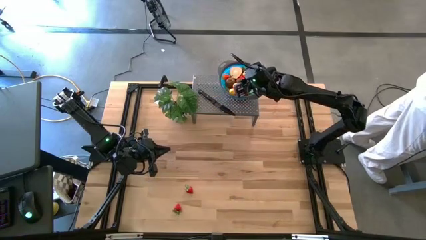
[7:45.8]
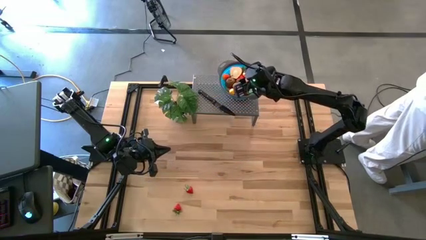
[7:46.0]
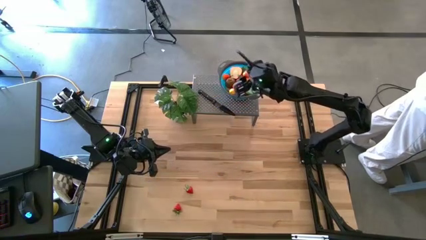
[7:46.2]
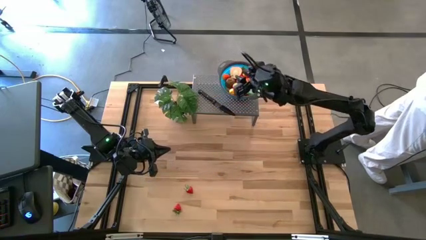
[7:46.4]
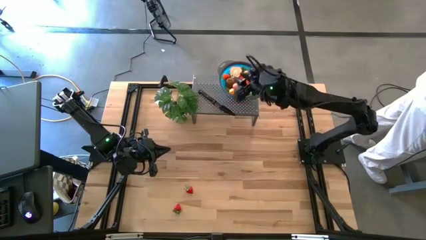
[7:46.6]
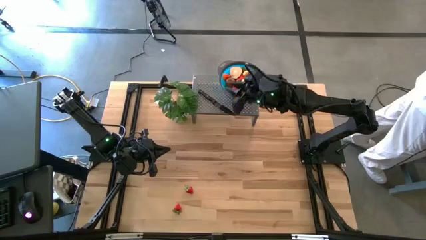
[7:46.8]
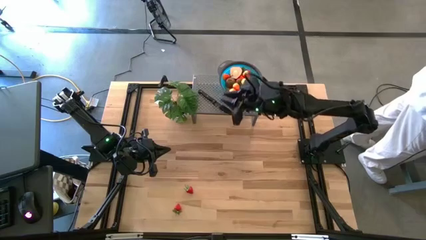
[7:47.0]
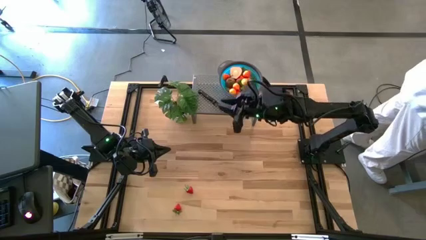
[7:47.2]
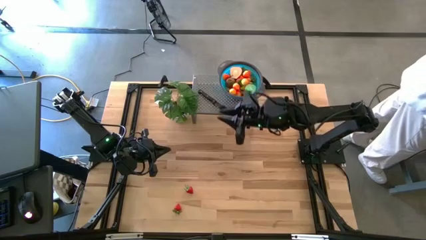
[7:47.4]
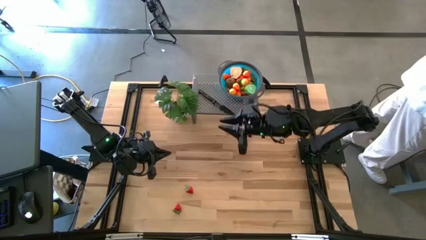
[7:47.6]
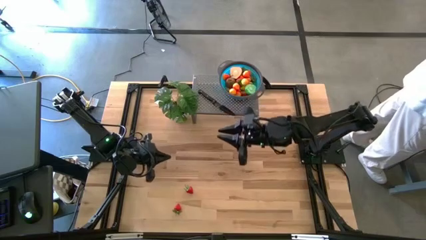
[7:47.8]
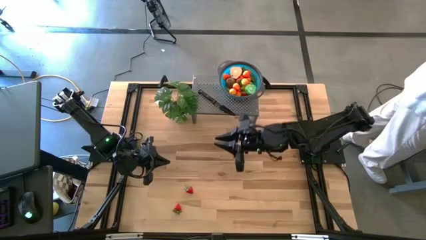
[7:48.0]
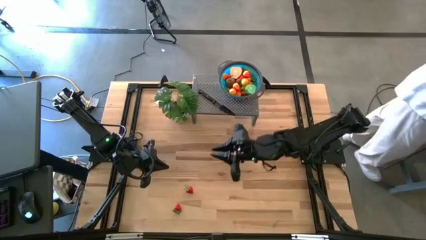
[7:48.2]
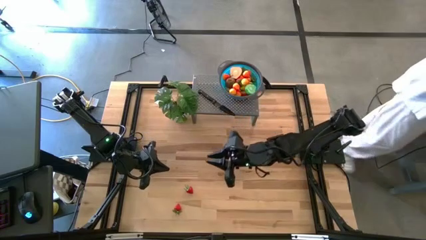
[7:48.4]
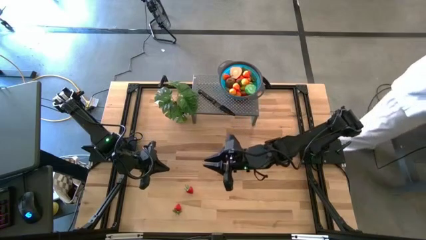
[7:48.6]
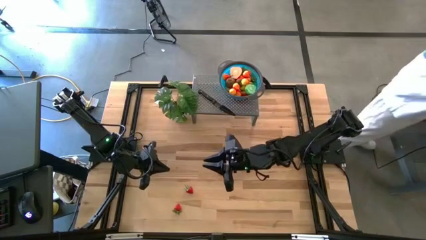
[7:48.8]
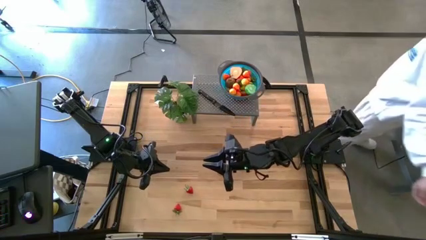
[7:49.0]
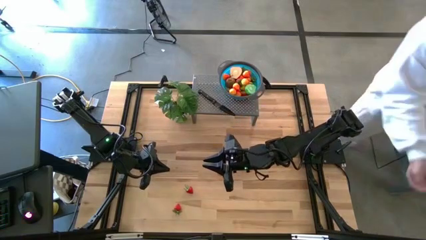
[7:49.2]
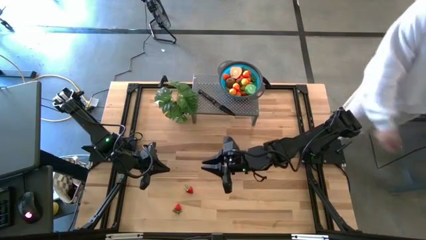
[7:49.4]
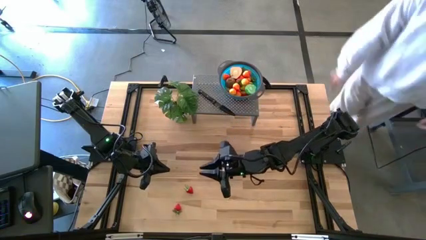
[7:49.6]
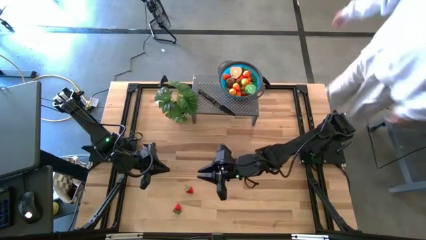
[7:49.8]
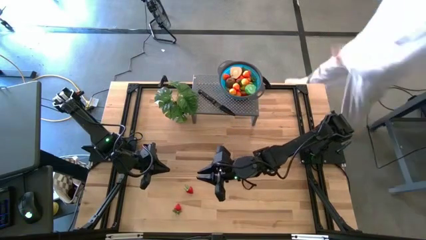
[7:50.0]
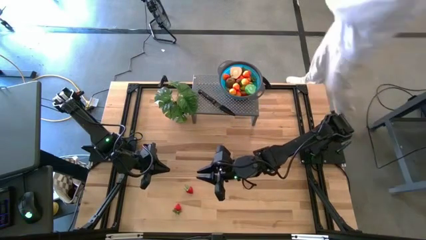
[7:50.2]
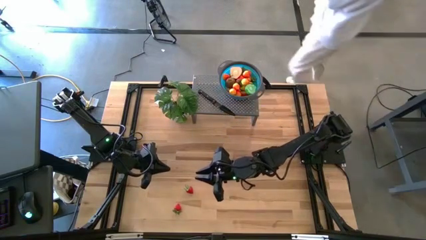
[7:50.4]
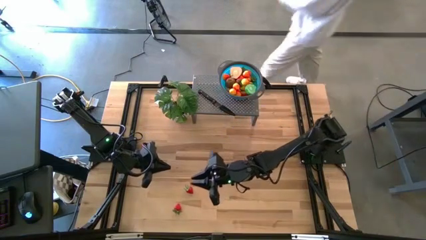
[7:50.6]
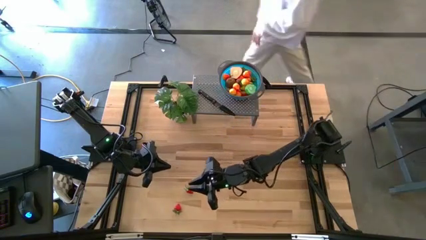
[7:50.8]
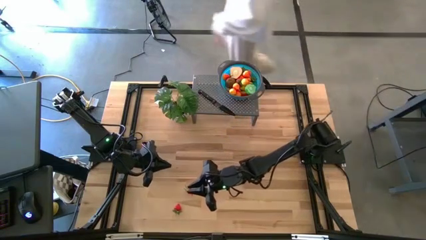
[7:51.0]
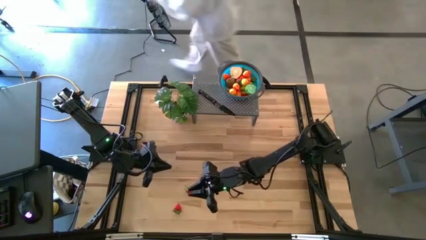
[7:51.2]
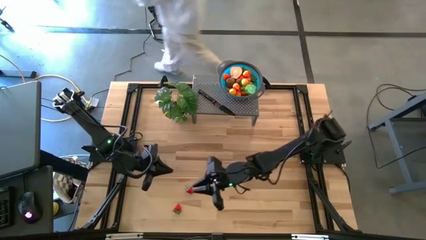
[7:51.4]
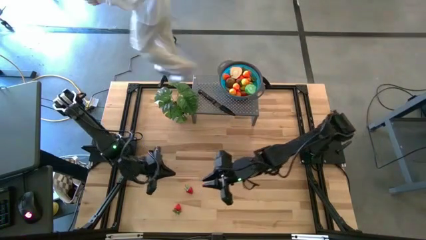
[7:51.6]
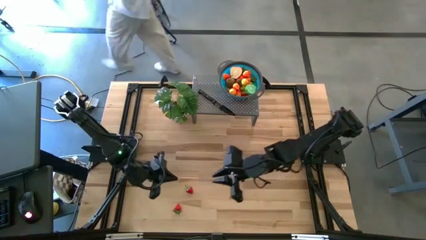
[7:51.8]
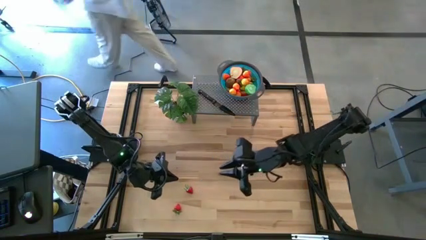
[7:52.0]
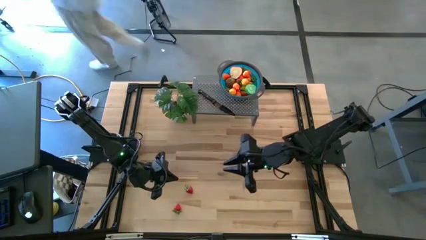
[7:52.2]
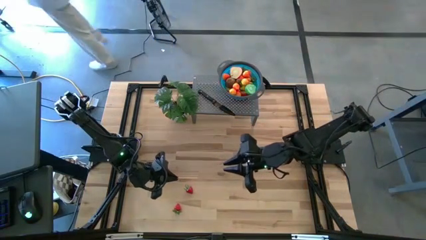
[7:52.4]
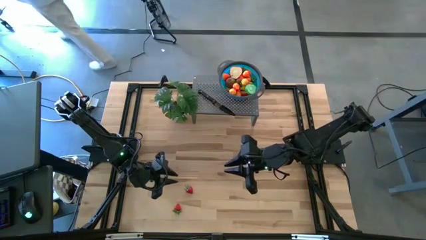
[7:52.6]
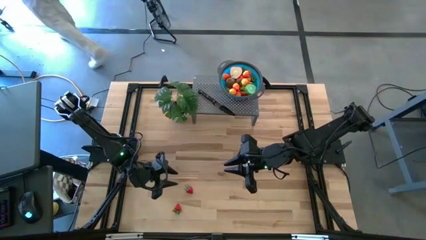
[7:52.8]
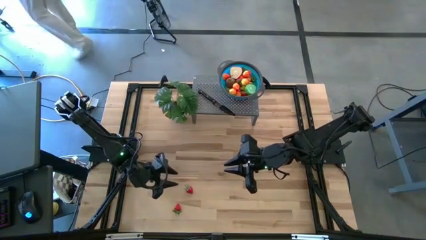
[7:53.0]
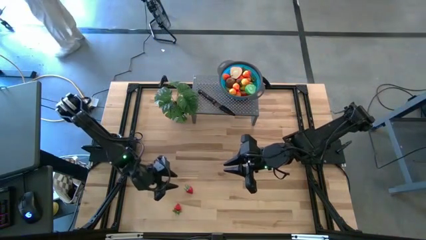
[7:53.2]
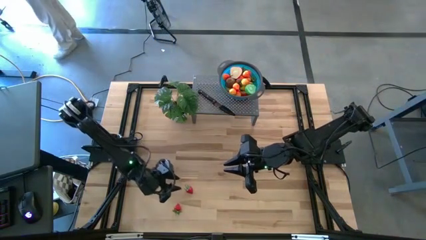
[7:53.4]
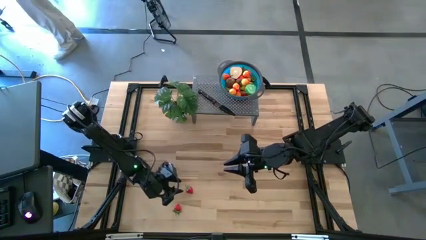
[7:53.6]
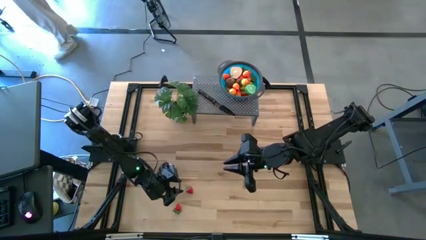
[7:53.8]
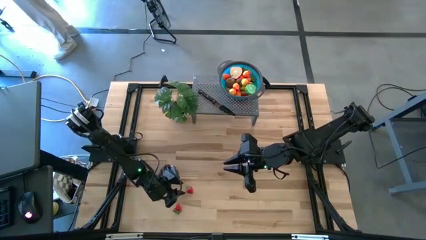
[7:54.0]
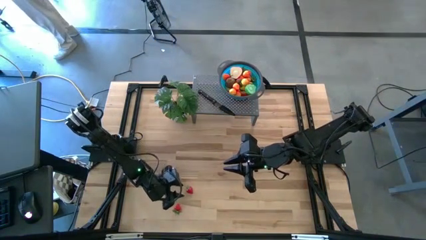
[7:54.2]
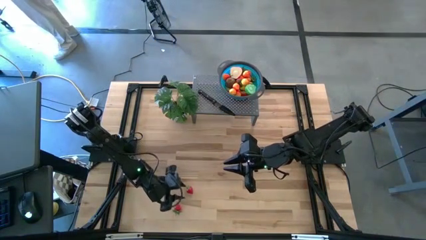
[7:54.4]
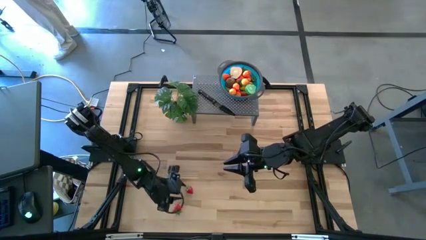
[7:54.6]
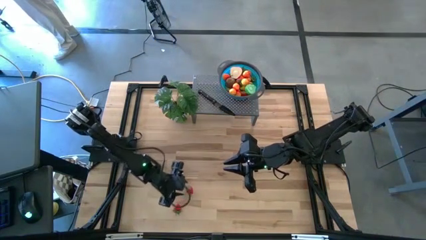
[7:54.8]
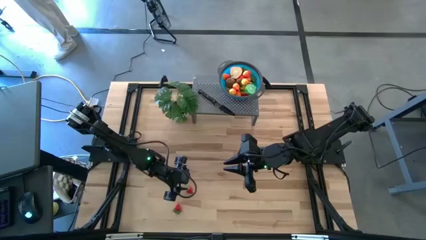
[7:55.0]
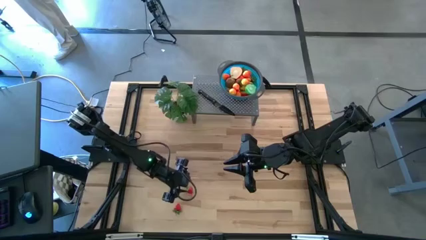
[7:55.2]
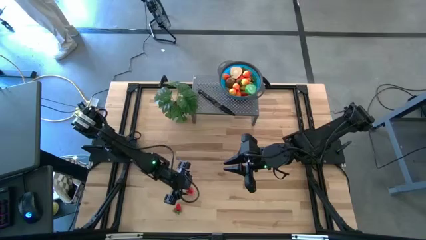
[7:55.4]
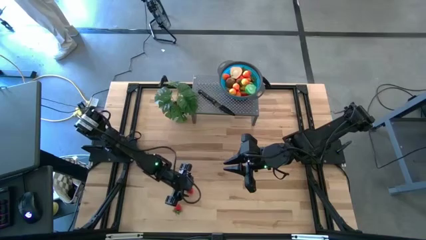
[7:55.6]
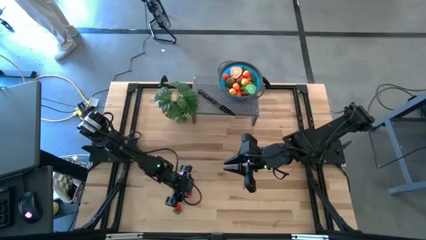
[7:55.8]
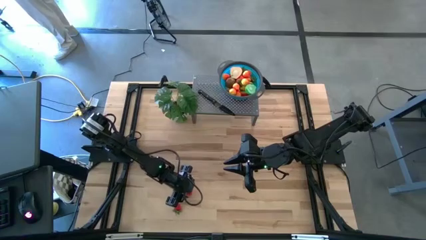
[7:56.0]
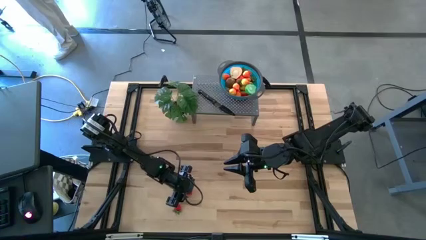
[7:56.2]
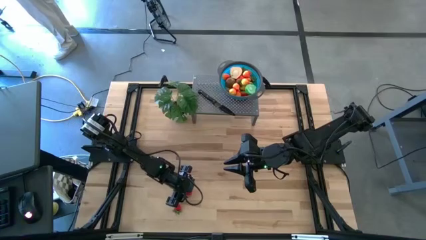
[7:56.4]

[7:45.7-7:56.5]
Task: Pick & Place Fruit
Put the red strawberry in the blue bowl on the shelf

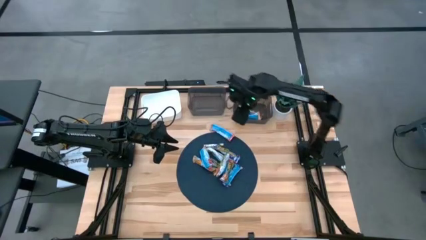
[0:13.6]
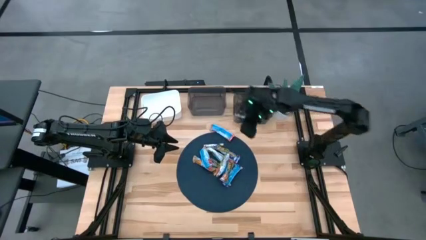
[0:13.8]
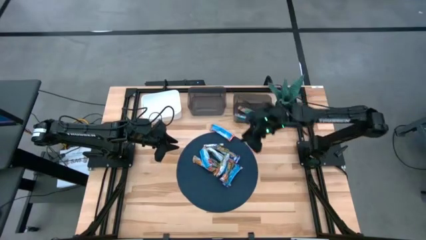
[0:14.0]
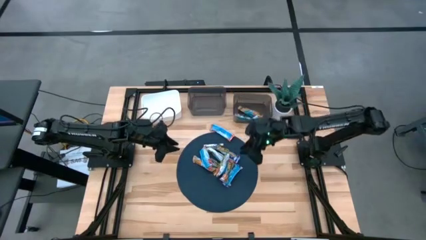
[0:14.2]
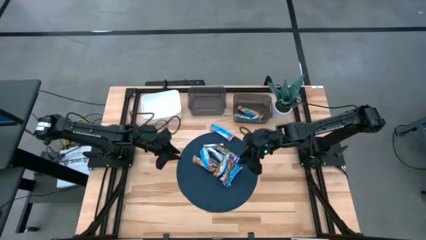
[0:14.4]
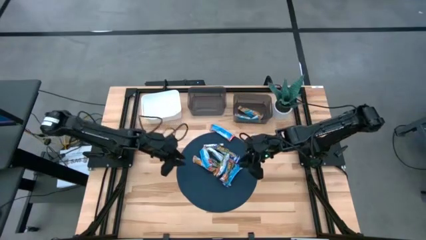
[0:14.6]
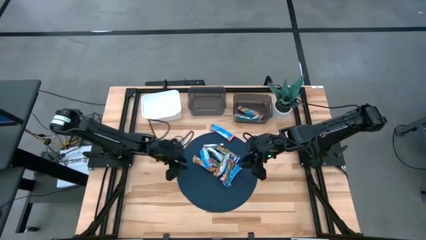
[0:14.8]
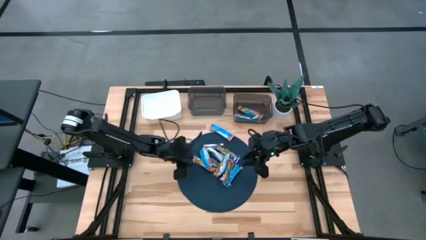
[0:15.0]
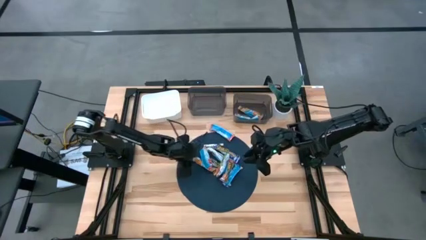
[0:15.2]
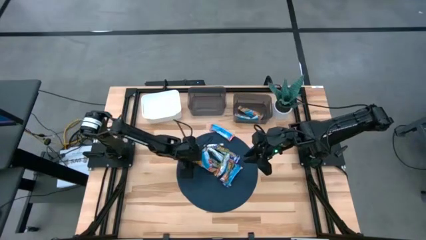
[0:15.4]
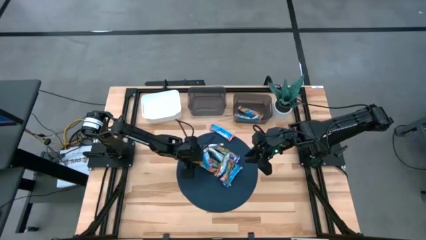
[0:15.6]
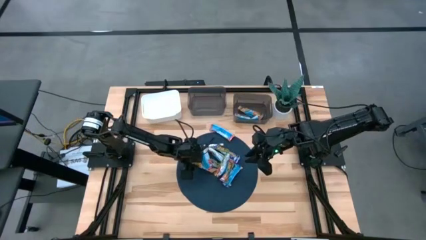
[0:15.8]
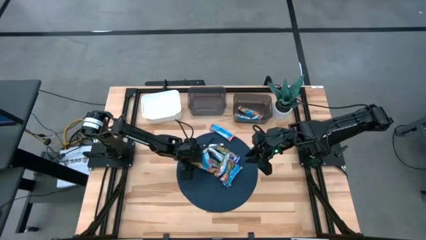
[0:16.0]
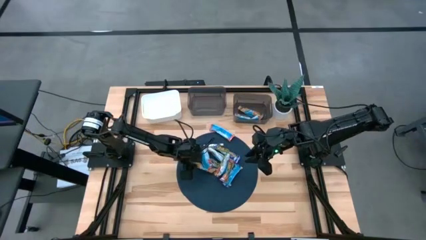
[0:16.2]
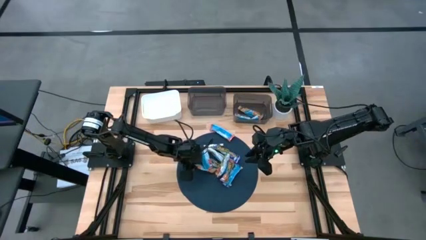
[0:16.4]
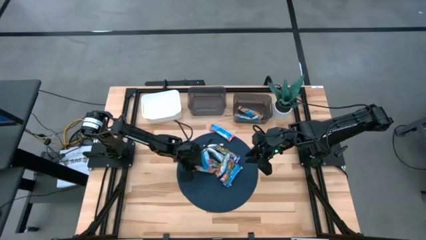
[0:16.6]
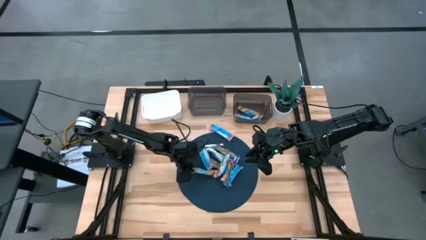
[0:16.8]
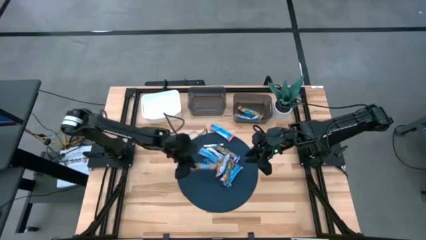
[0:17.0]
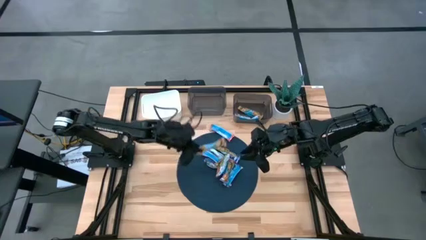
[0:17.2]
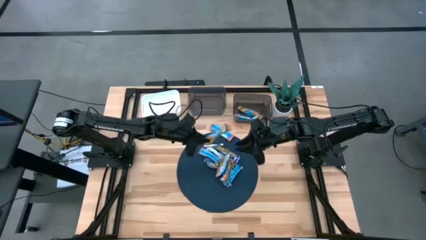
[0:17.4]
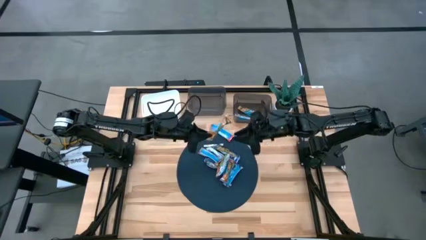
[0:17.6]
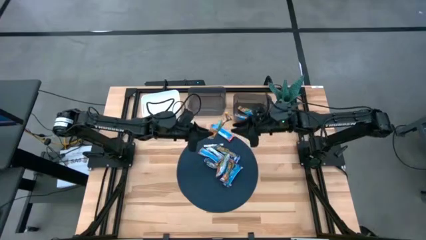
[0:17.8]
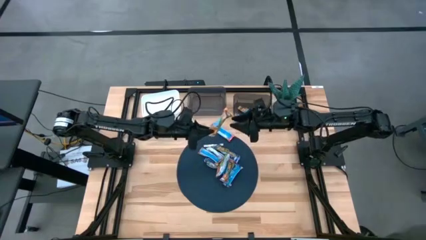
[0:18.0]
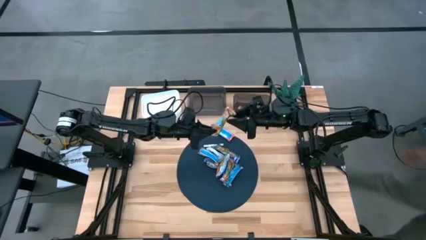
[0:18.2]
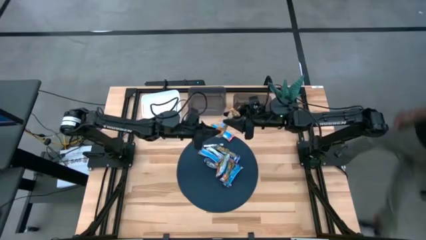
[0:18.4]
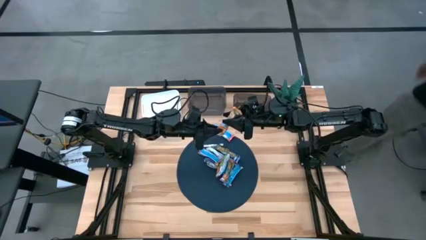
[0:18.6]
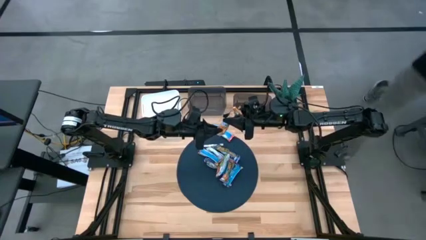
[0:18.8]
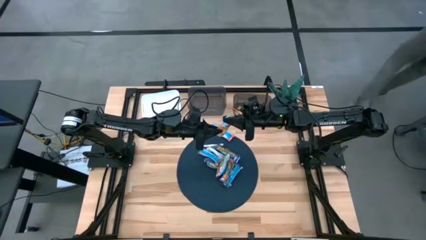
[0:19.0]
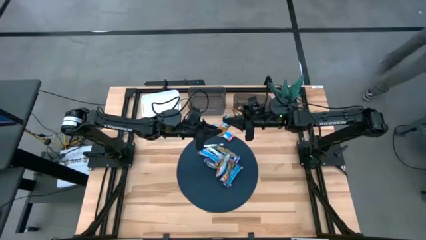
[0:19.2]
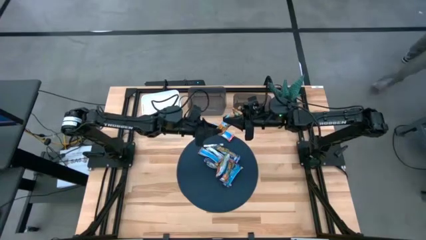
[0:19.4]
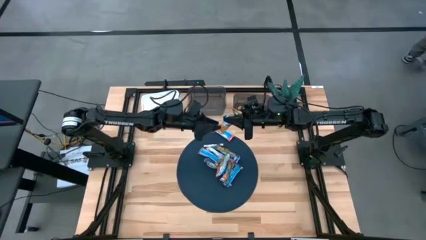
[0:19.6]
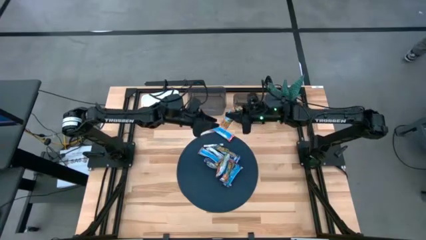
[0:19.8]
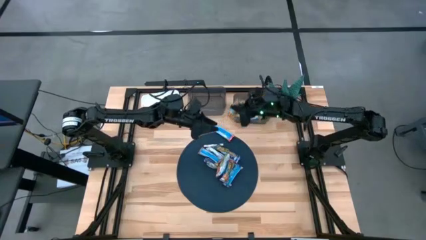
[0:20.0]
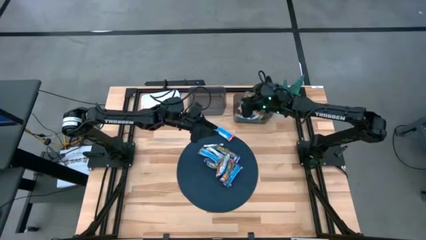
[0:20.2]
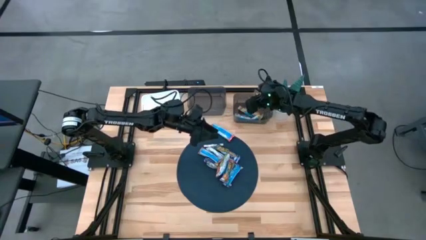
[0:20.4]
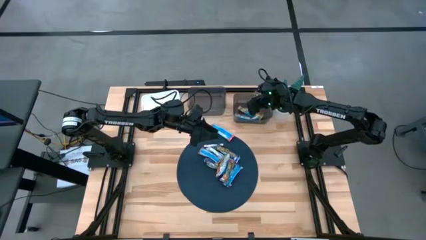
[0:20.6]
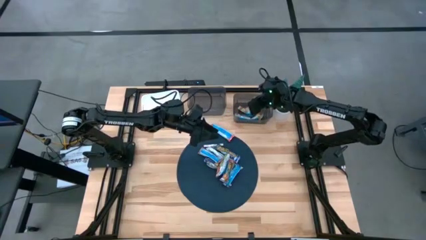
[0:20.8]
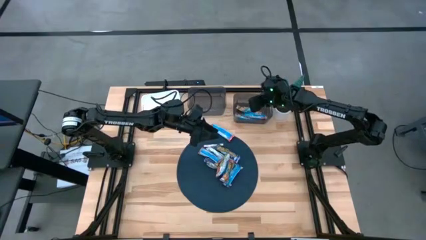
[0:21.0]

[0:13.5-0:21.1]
Task: Pick and place Granola Bars by type
Put the yellow granola bar into the right black bin
